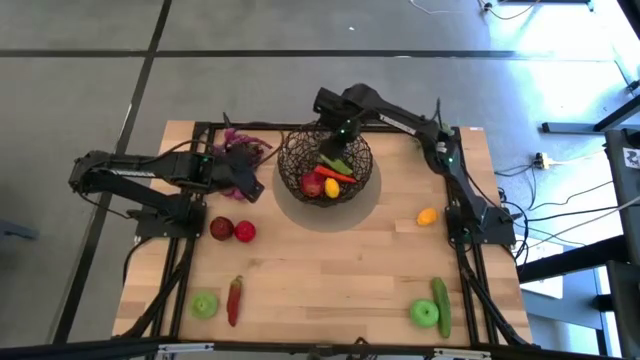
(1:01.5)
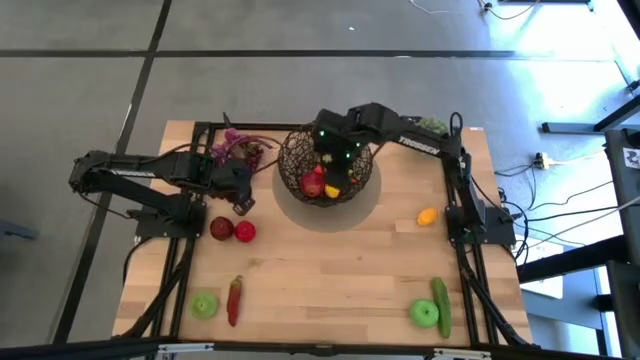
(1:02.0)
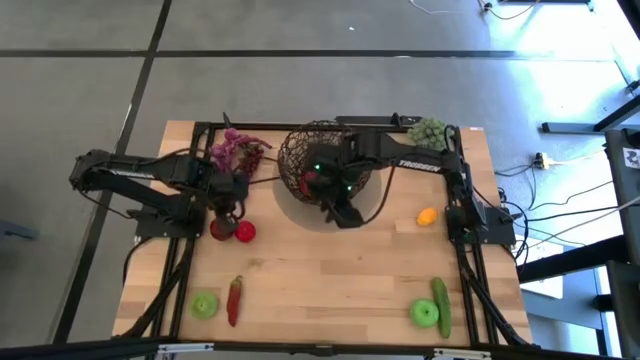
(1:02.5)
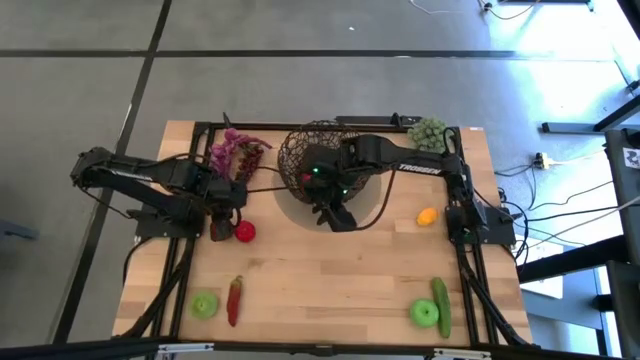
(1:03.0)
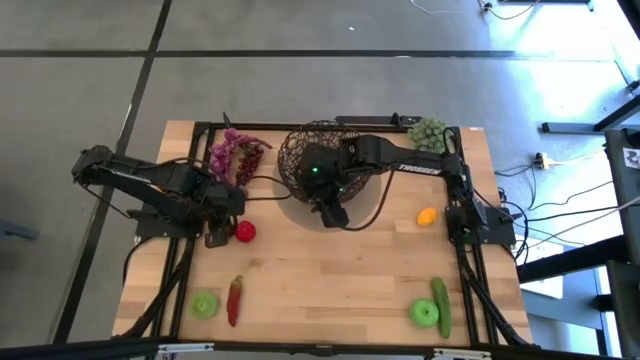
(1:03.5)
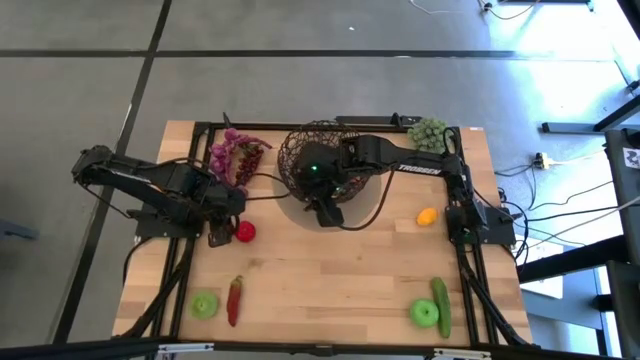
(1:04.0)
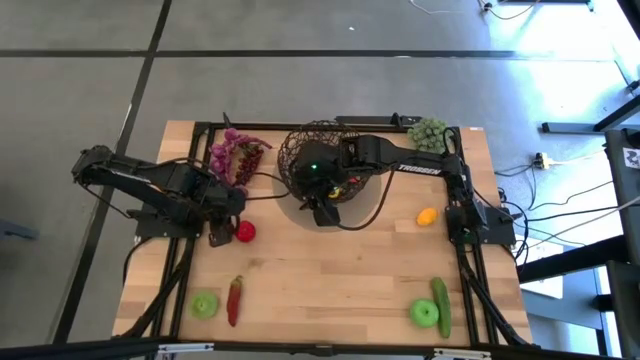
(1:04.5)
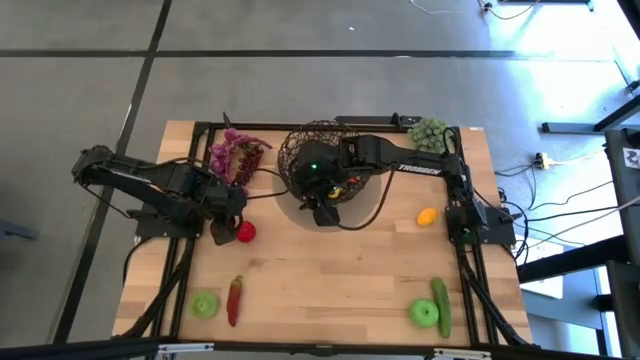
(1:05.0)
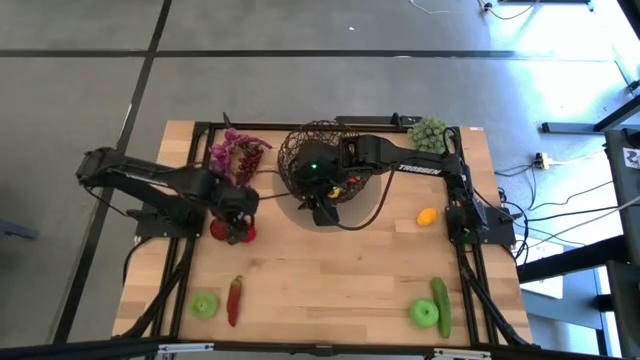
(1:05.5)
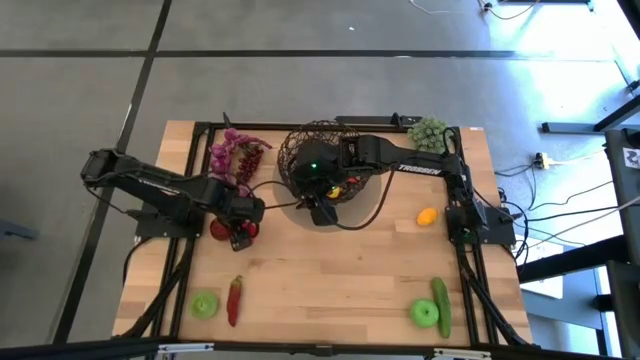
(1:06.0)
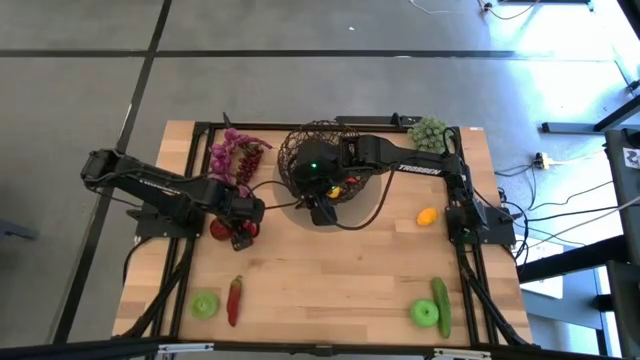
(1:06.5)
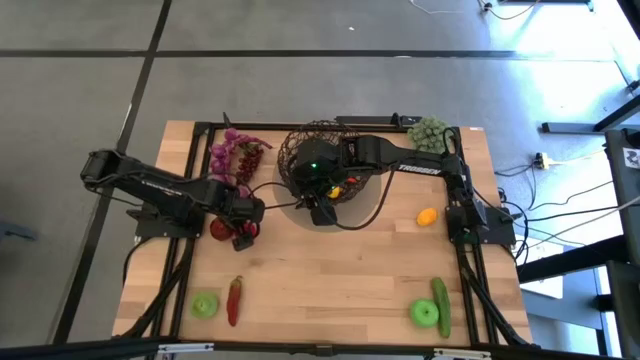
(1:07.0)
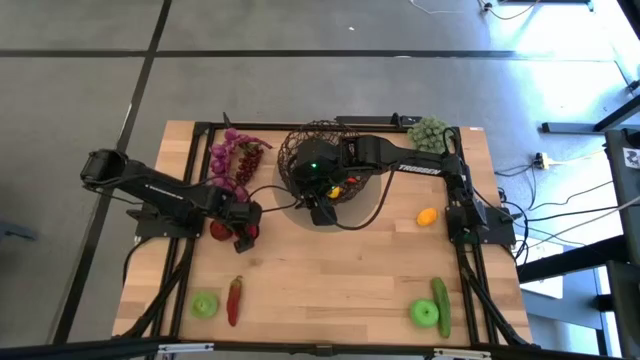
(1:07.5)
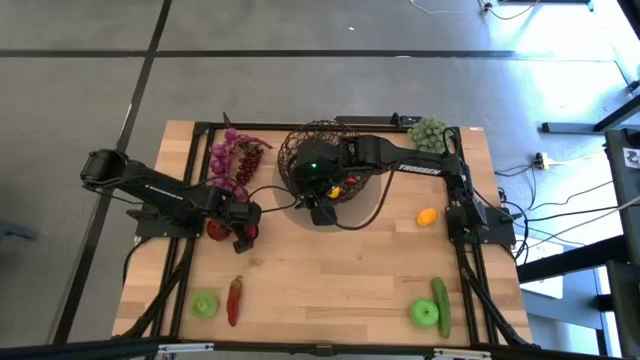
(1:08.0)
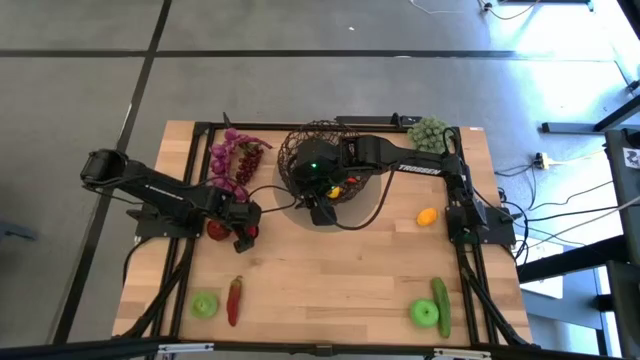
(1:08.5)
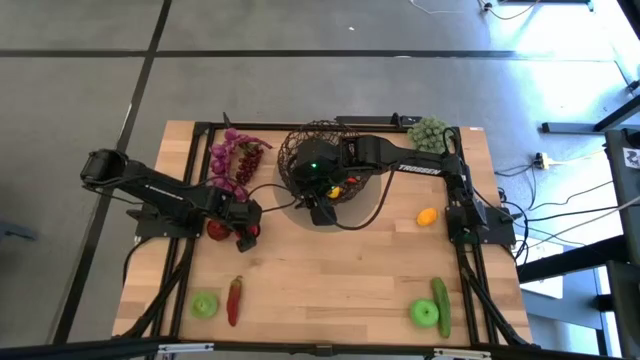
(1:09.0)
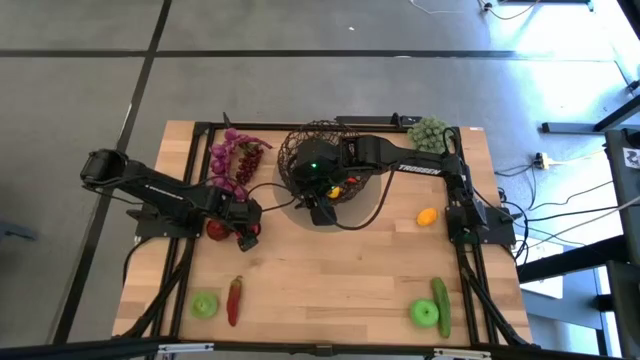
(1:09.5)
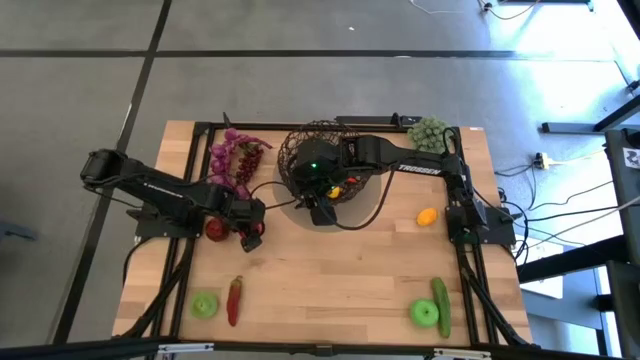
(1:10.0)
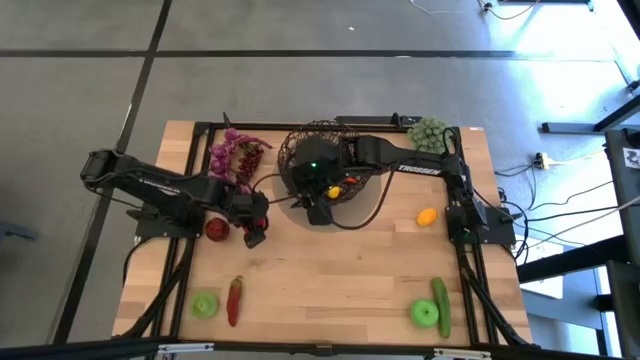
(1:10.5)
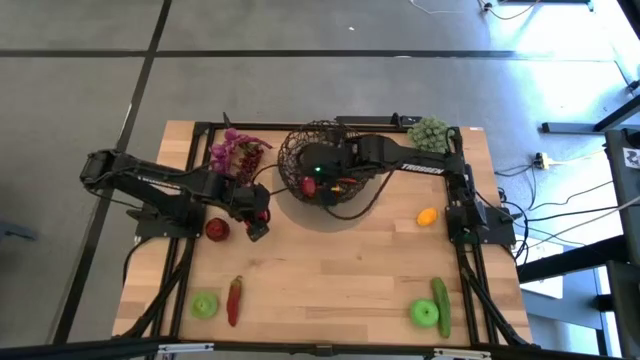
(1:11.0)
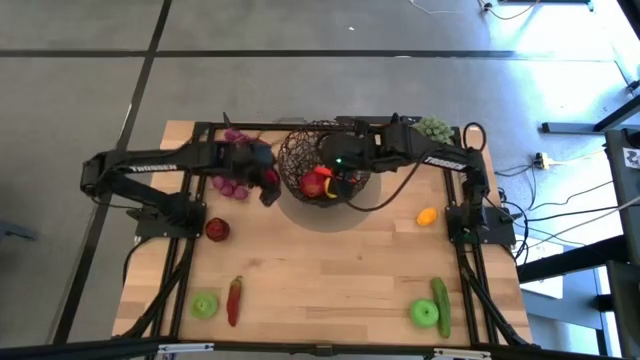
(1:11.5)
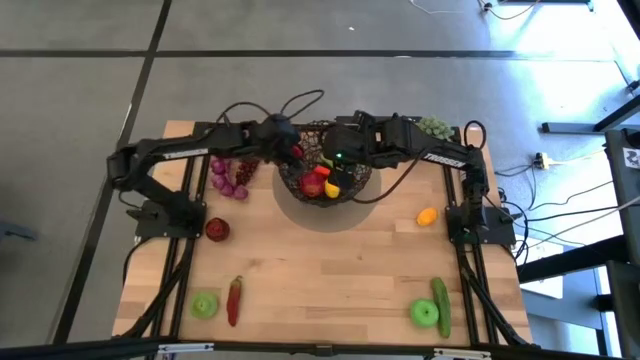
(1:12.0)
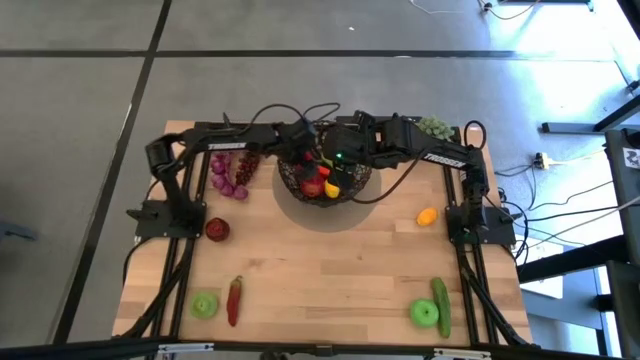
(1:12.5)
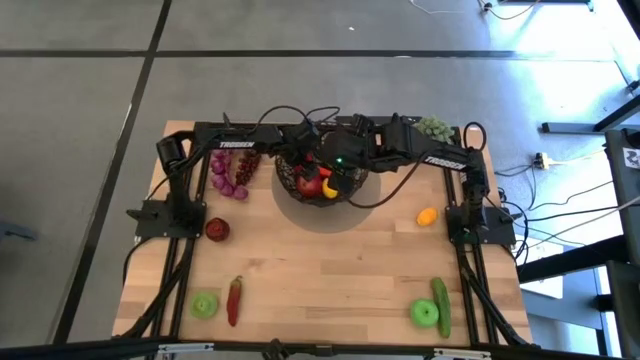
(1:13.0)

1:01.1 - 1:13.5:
Task: Build produce basket
Put the tomato into the wire basket

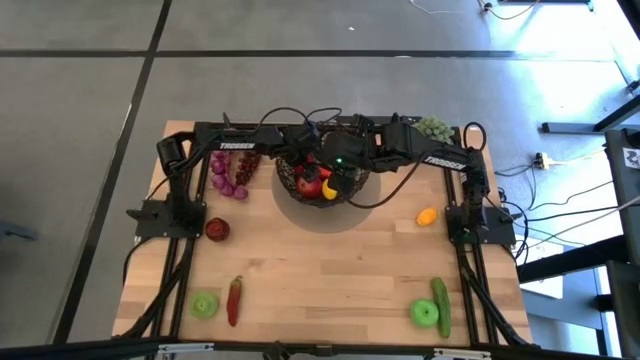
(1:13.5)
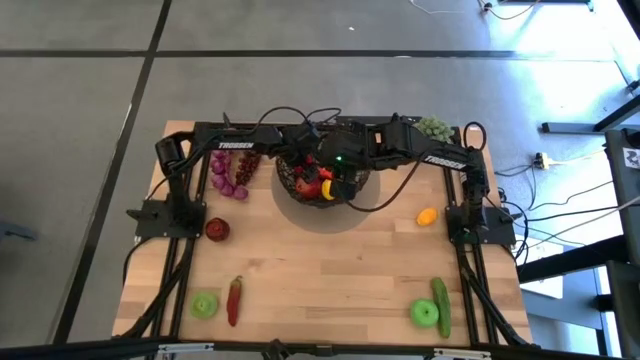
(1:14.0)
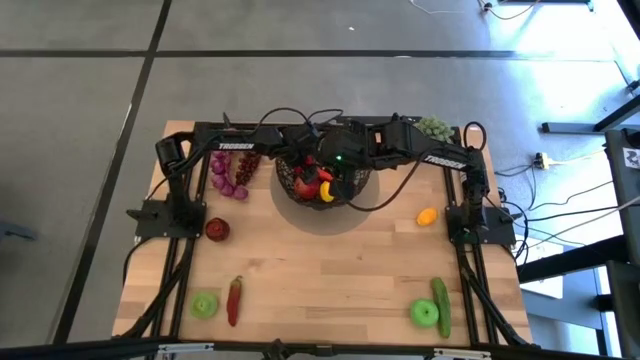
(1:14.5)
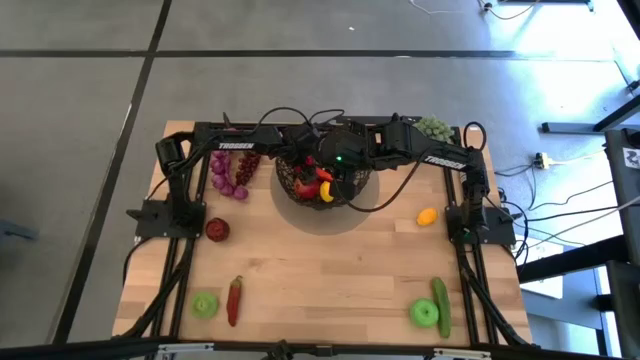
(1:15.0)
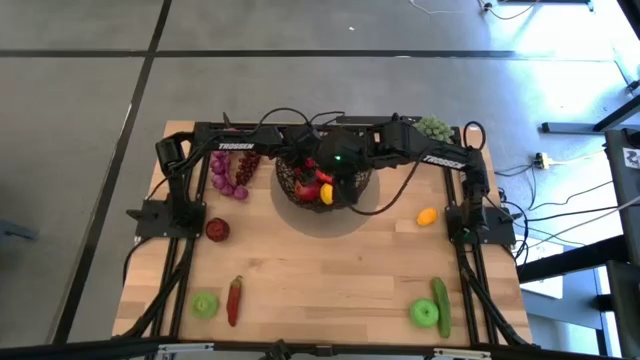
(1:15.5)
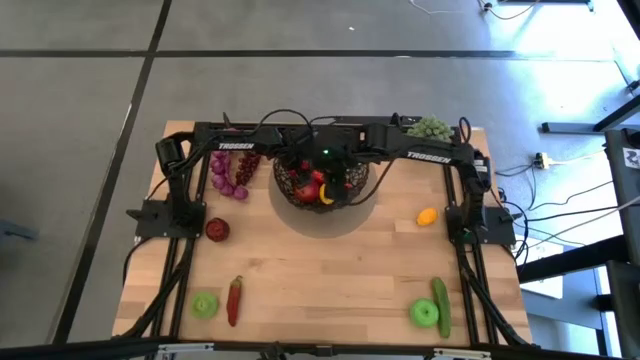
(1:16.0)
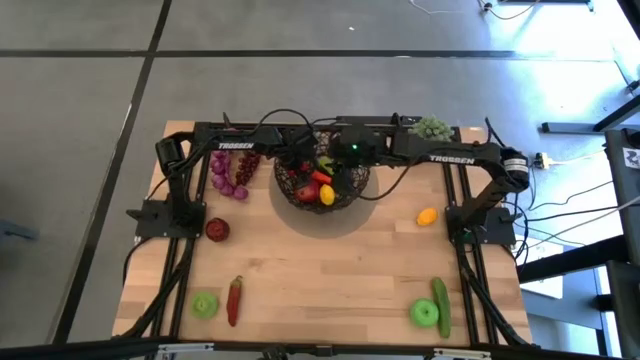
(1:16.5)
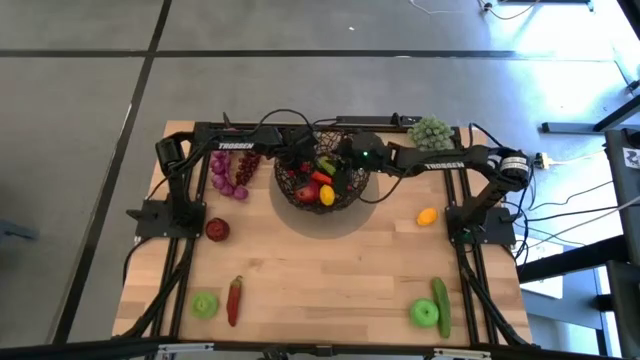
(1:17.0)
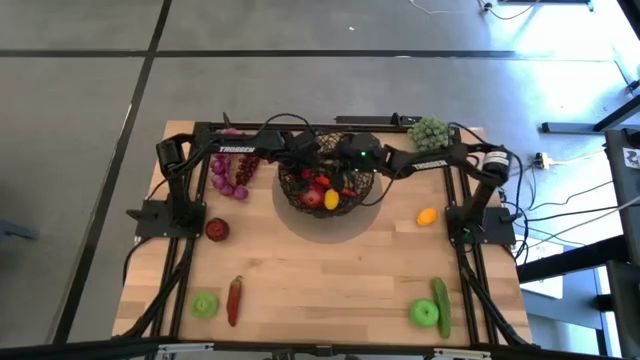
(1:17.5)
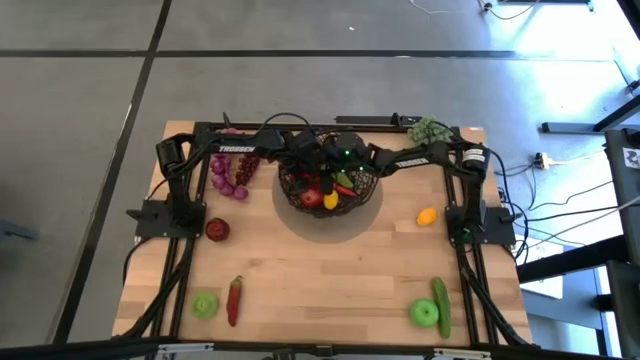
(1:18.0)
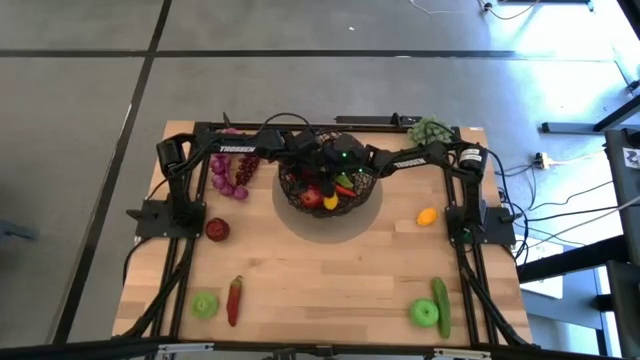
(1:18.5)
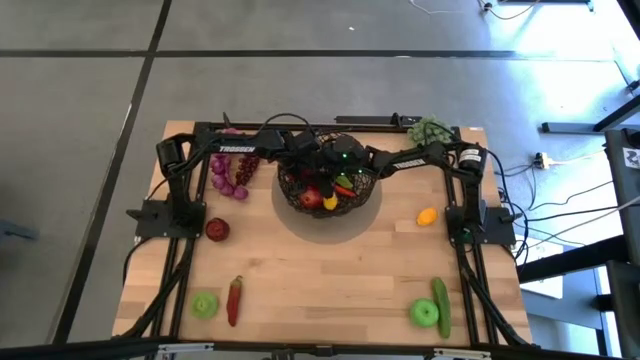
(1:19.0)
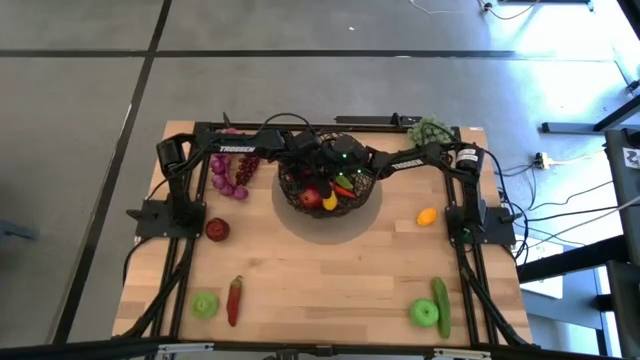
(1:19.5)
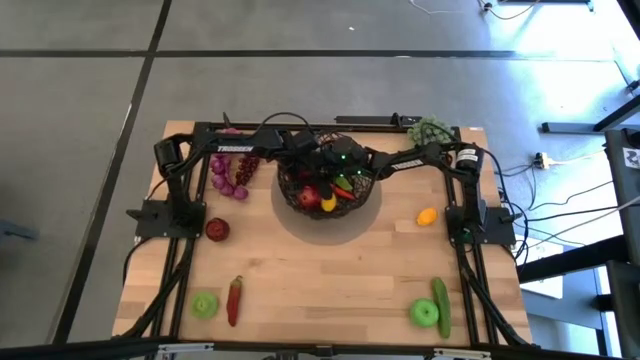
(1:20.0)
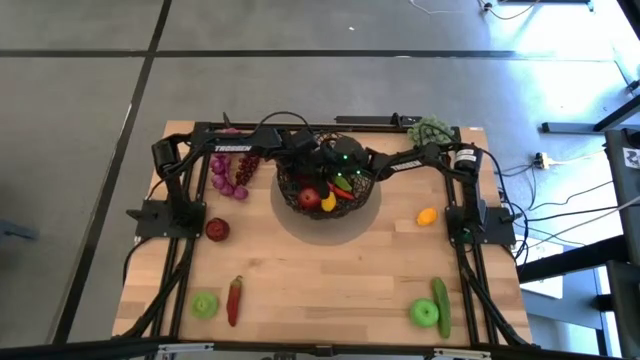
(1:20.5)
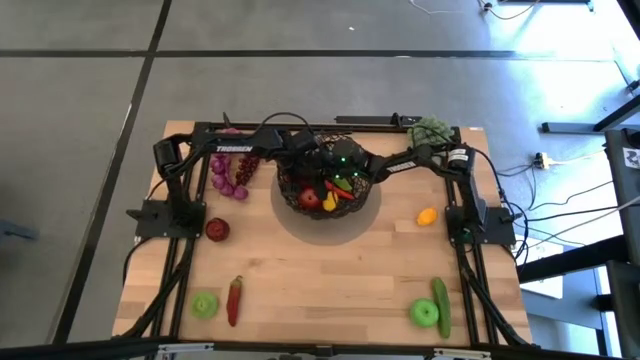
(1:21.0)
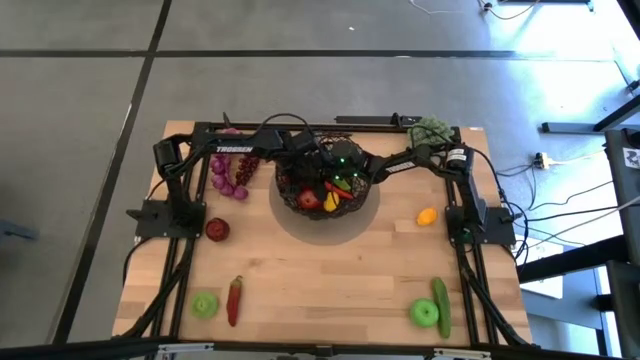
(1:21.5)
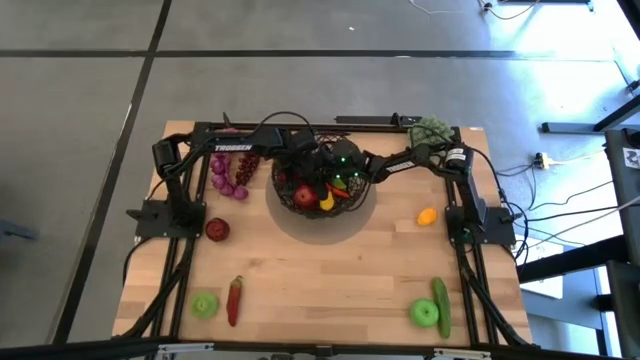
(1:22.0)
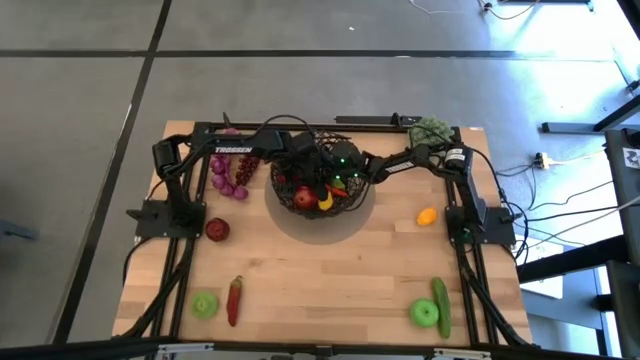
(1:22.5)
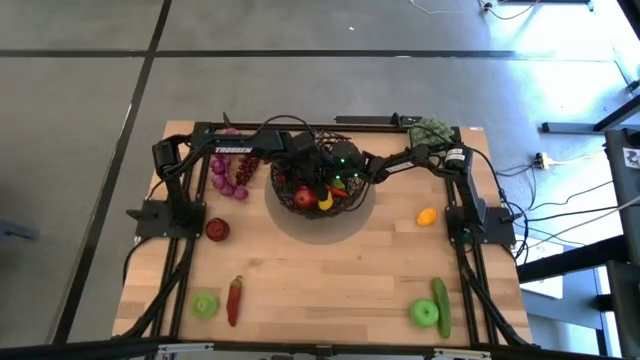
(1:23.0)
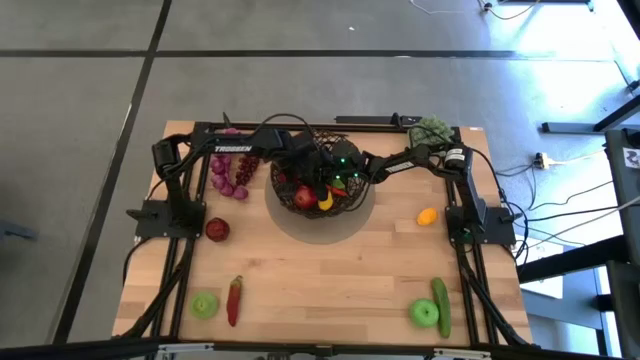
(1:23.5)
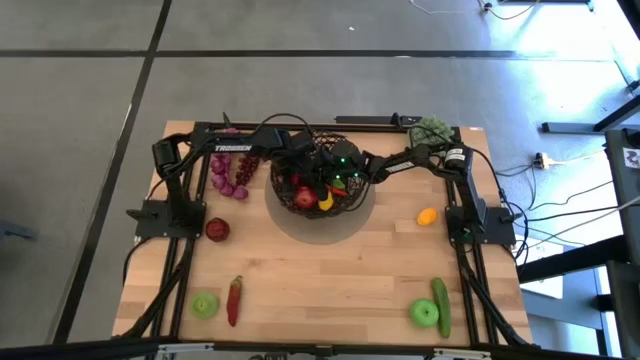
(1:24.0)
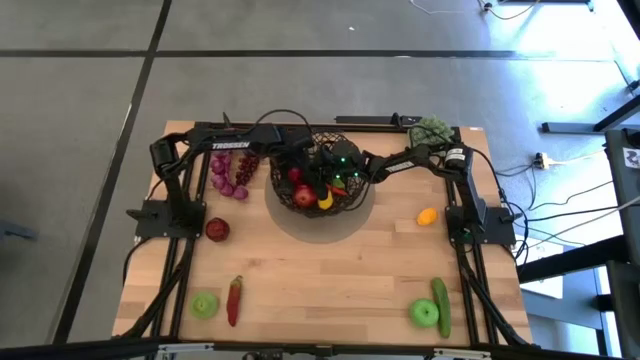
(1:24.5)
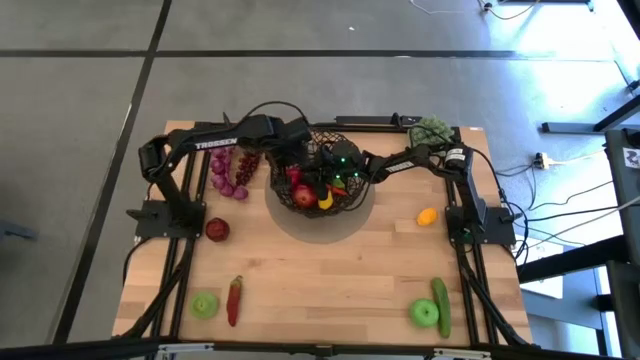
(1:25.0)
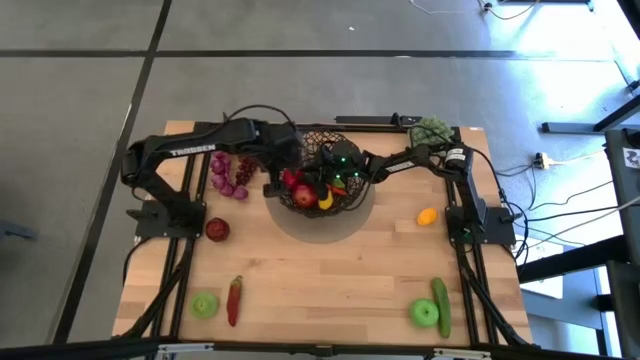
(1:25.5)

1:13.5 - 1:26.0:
Put the tomato into the wire basket
